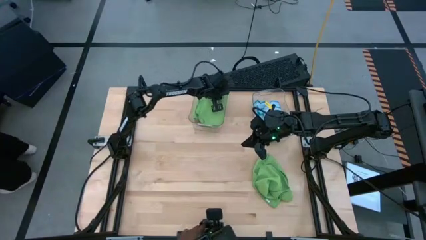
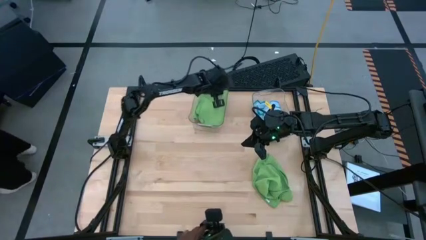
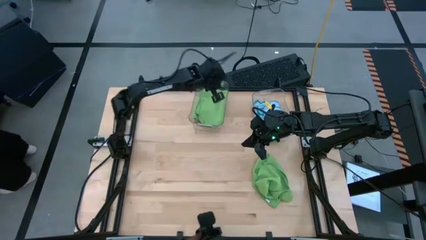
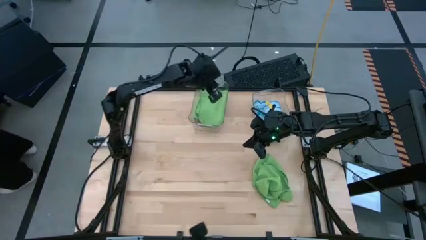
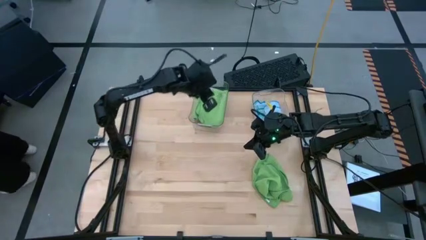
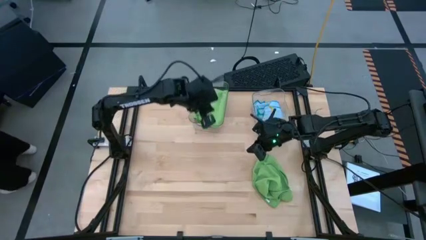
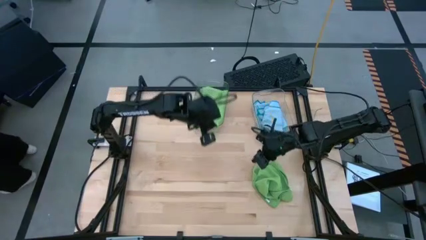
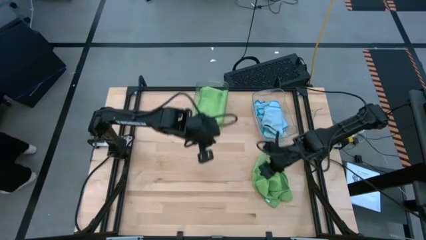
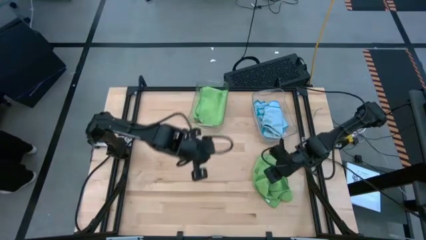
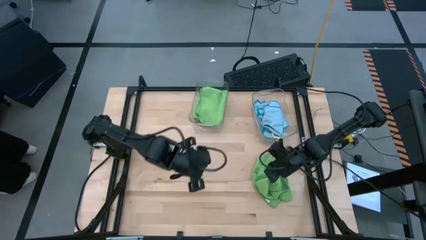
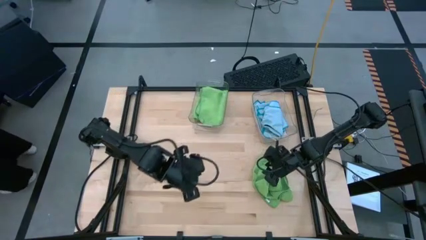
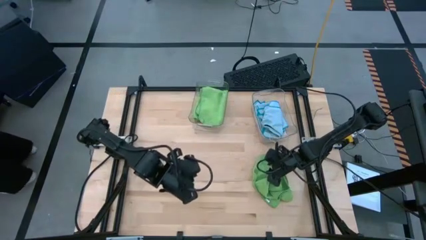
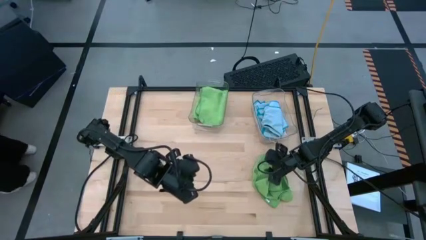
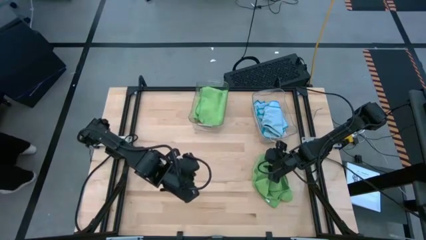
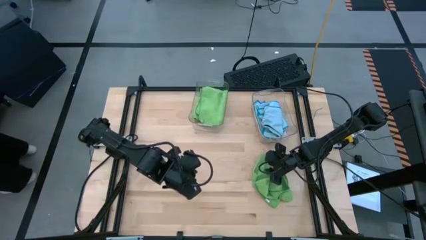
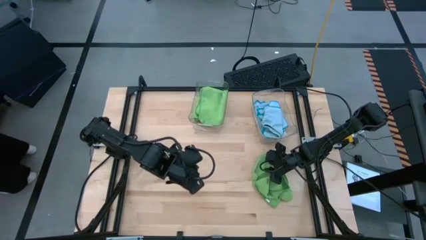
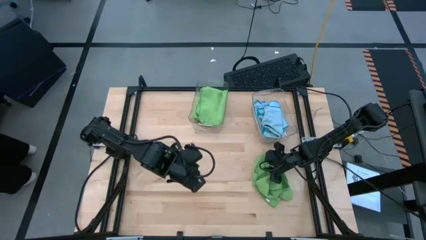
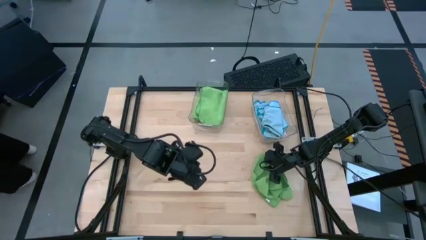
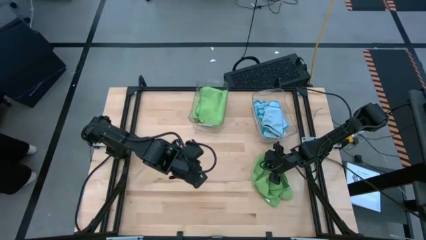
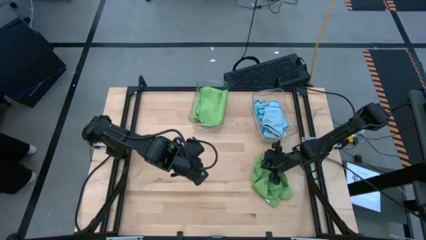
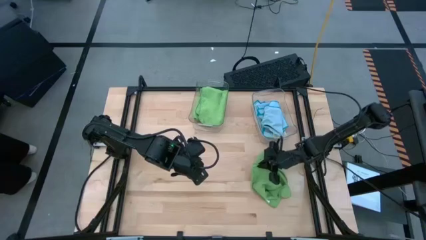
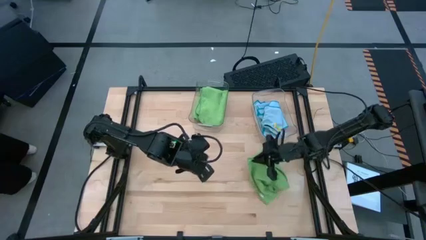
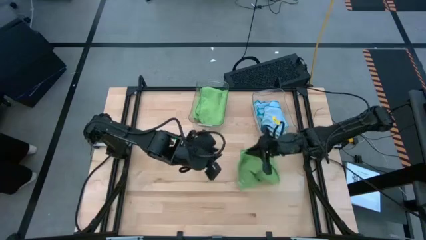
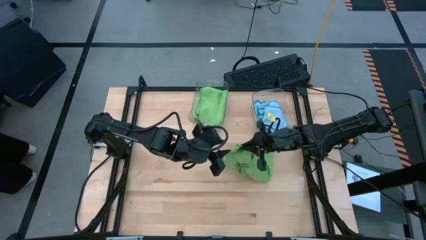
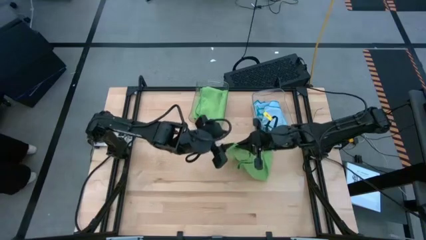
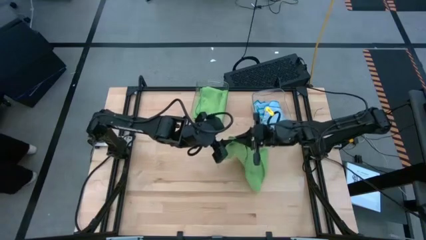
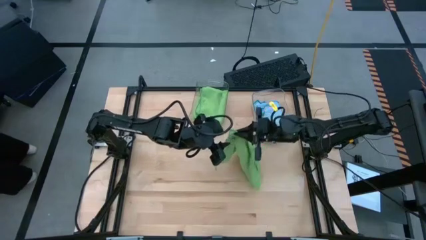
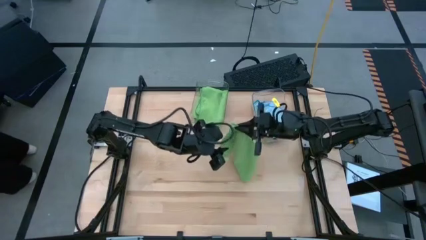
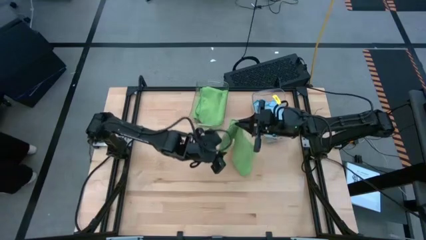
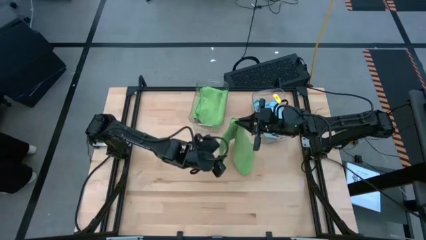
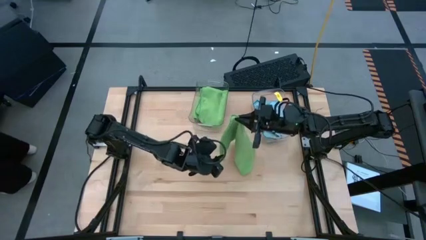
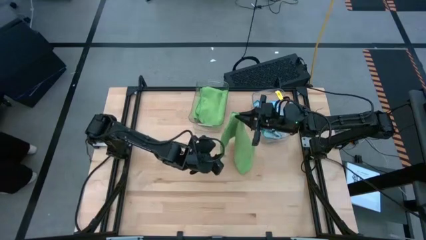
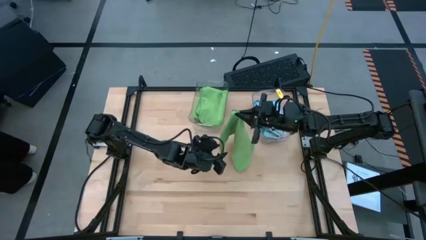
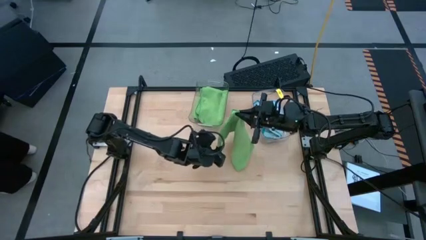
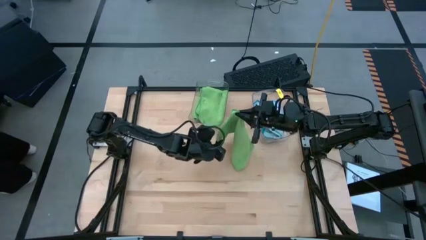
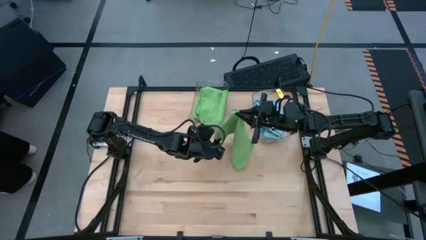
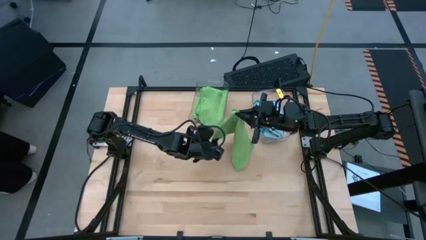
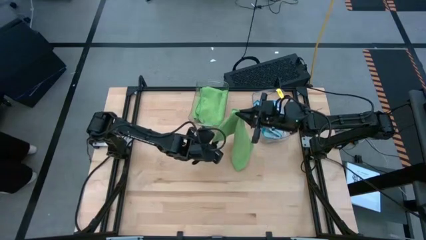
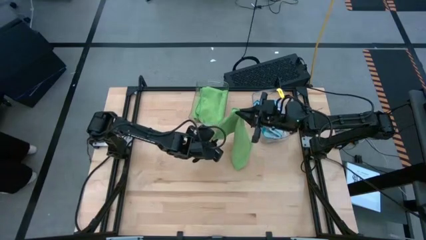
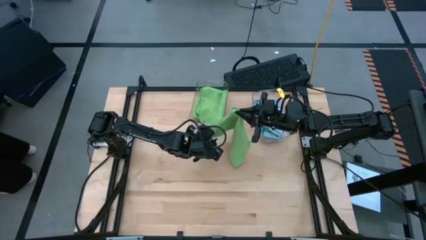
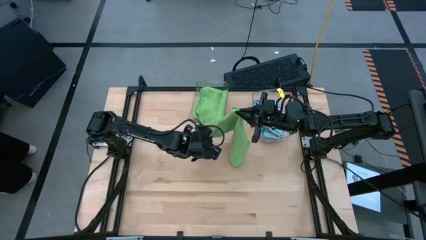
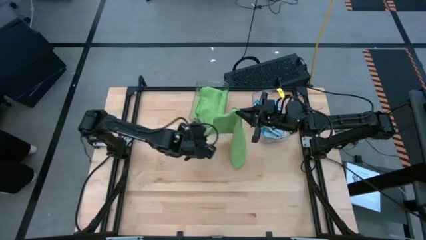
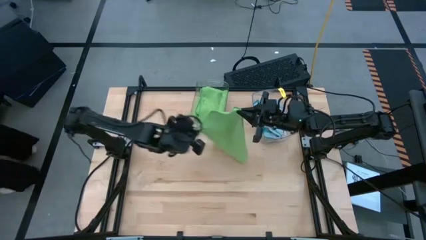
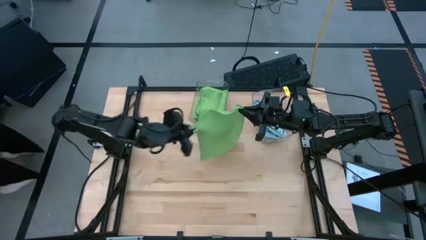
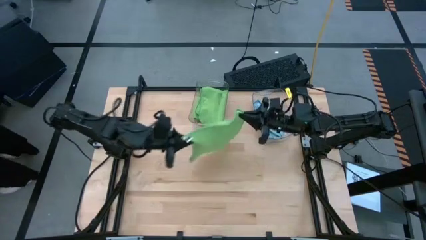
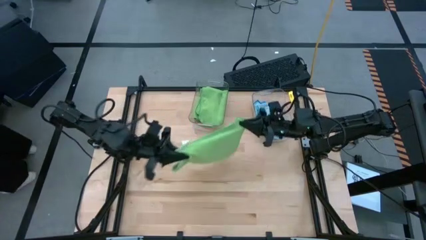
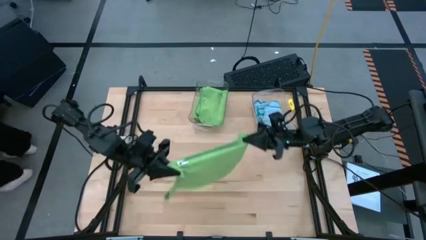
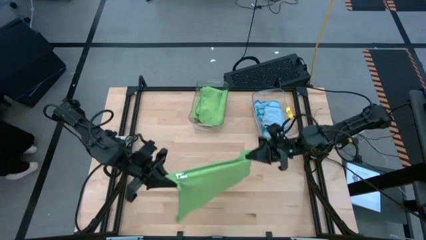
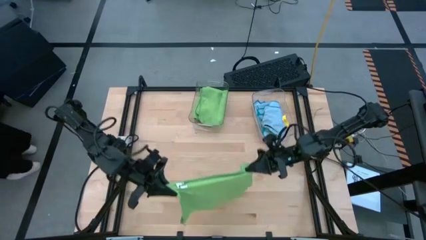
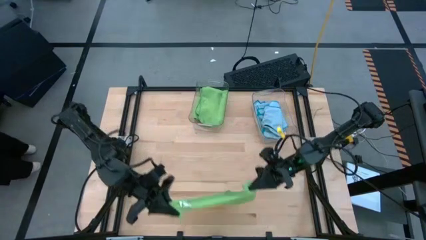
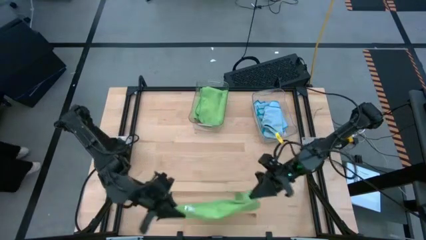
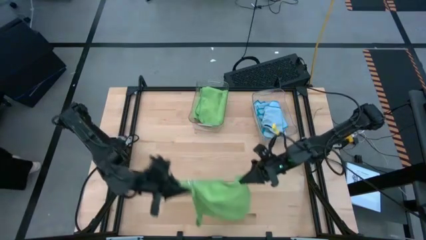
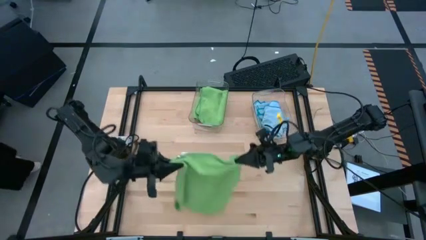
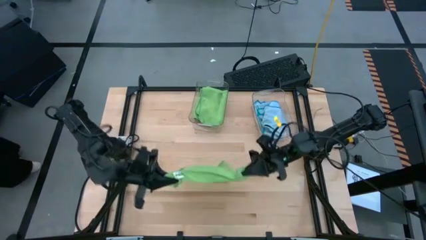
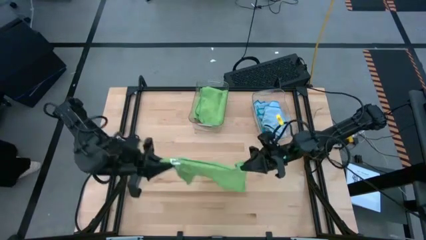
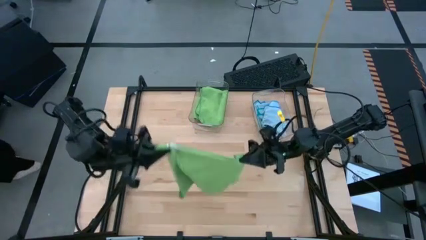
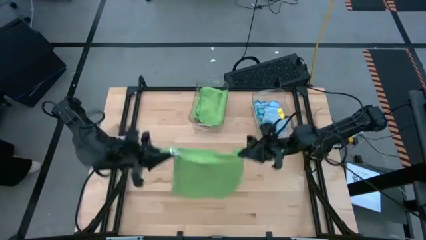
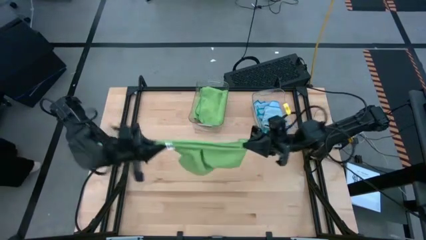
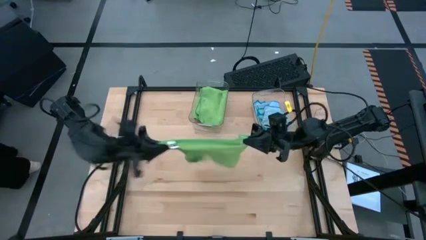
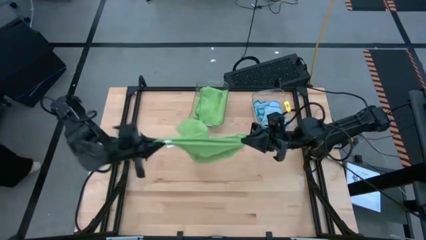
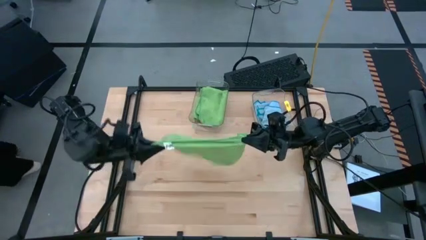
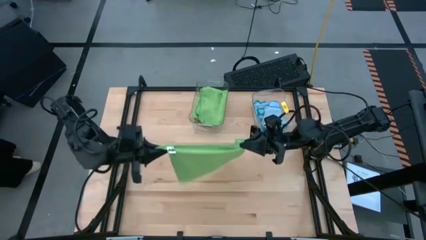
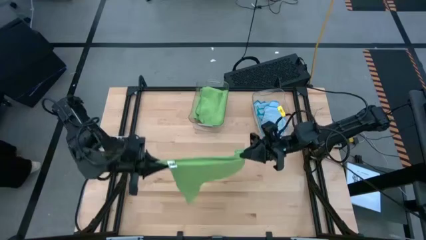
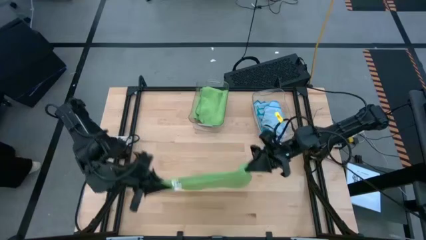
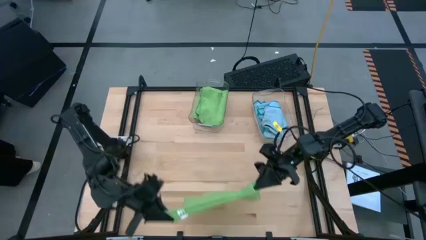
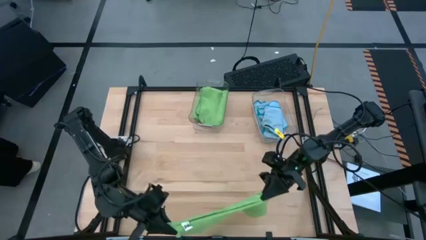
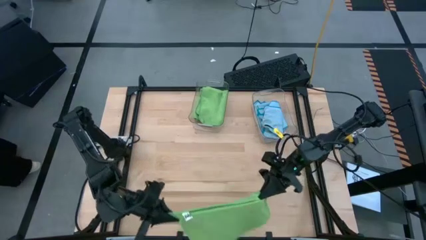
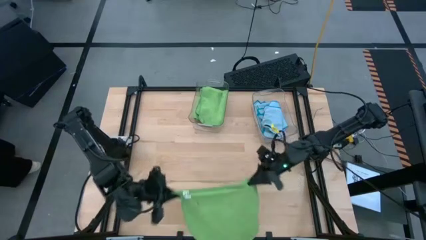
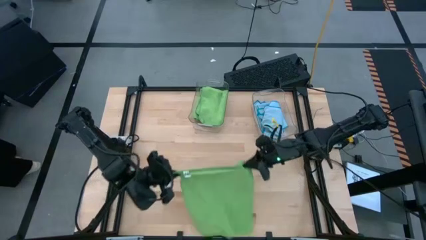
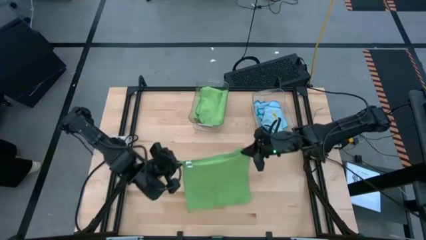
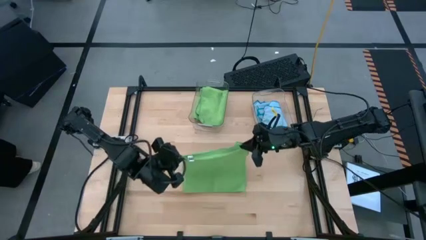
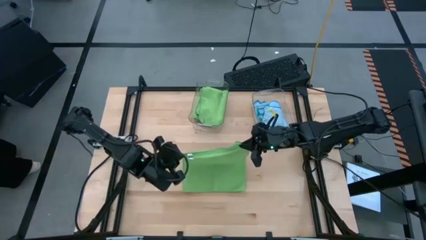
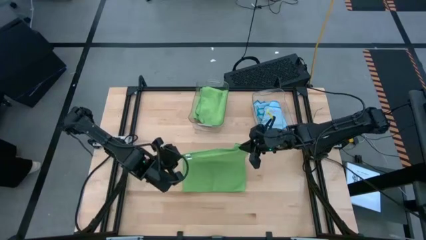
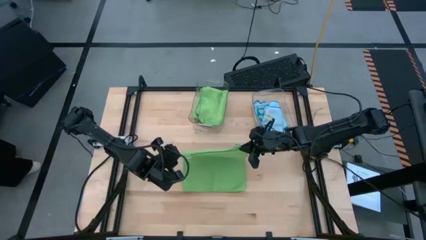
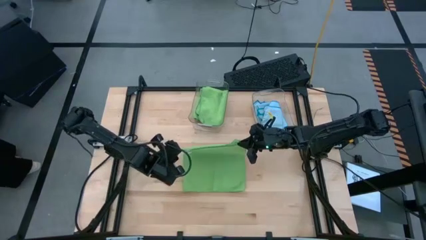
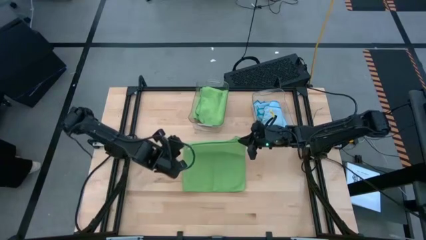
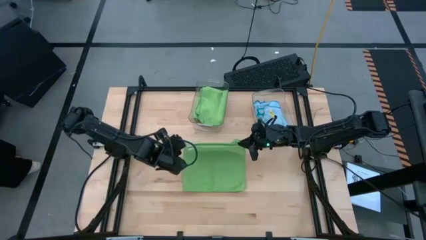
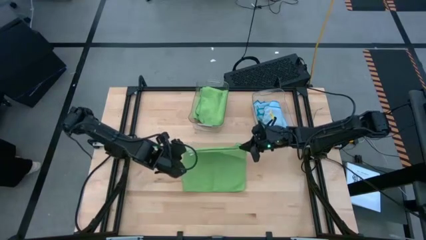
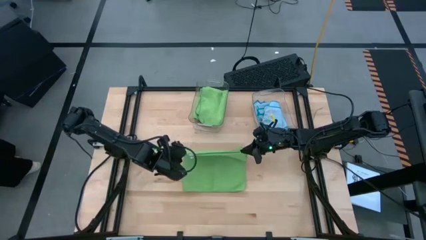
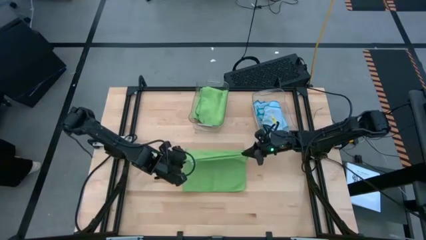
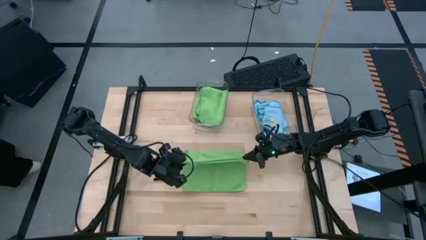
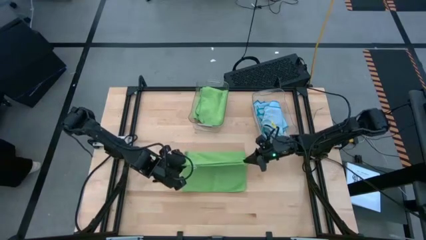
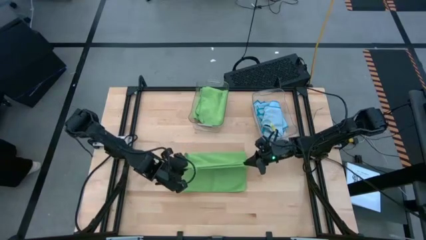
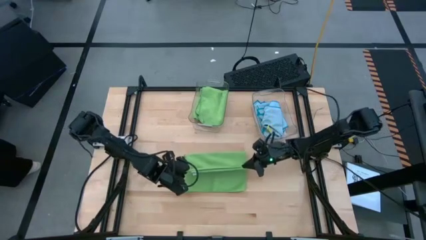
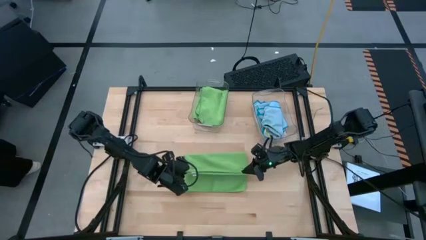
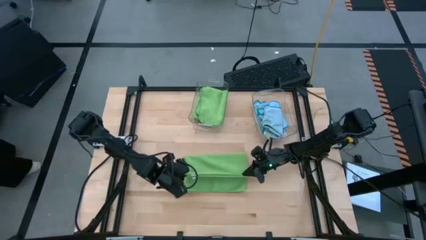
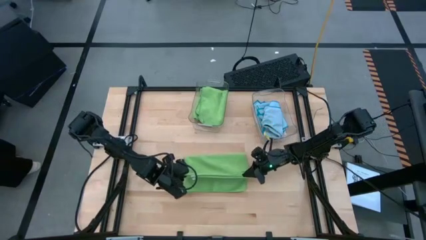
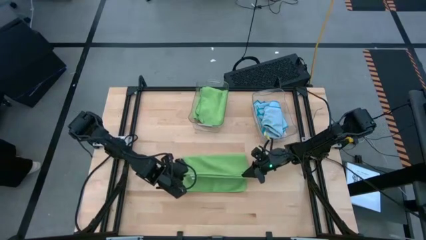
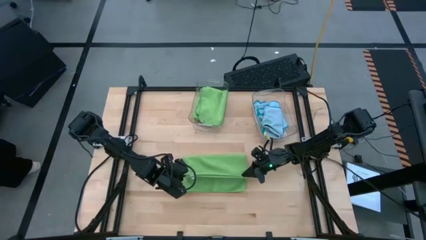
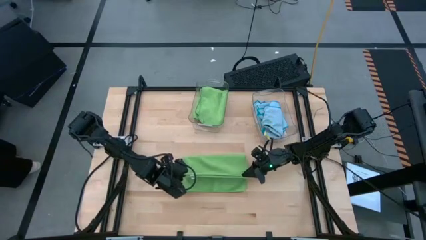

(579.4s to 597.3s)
Task: Fold microfiber towels
Fold the green microfiber towel
